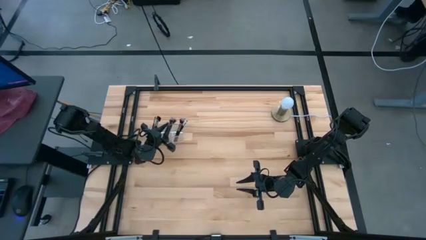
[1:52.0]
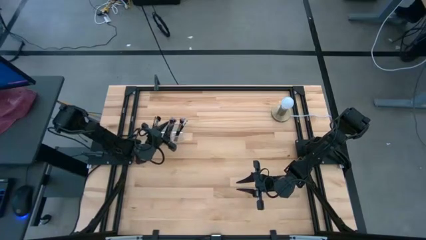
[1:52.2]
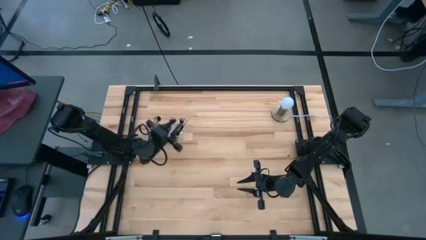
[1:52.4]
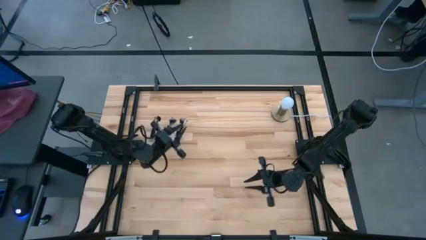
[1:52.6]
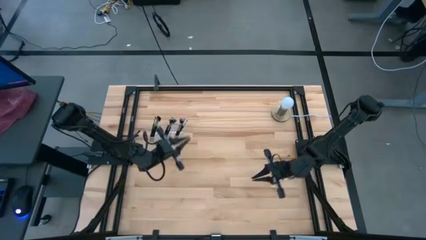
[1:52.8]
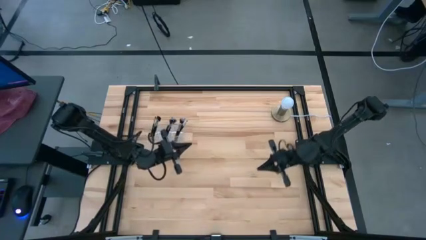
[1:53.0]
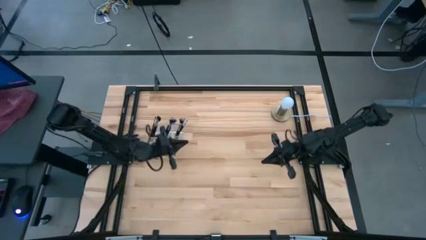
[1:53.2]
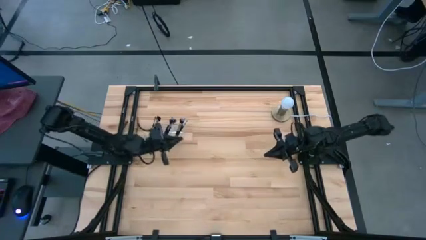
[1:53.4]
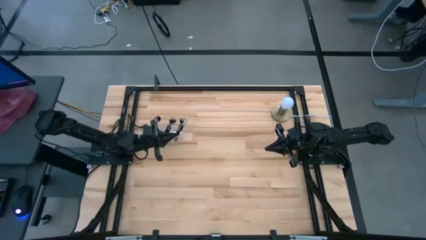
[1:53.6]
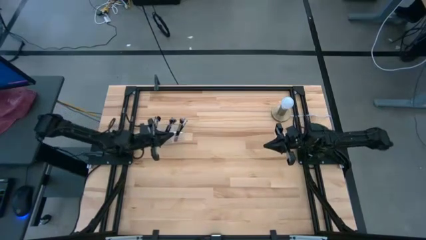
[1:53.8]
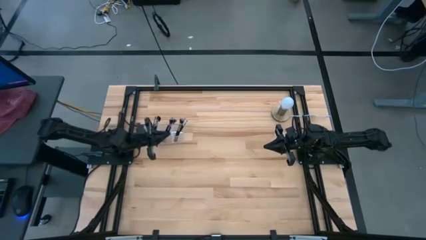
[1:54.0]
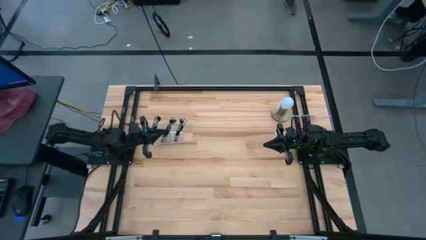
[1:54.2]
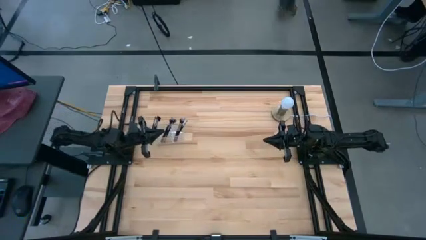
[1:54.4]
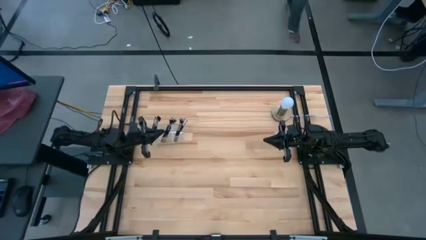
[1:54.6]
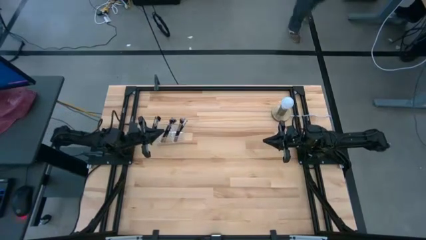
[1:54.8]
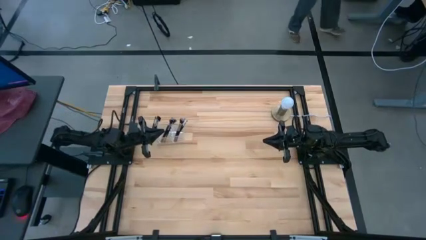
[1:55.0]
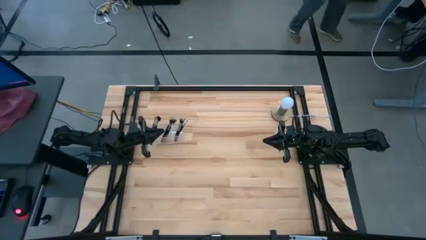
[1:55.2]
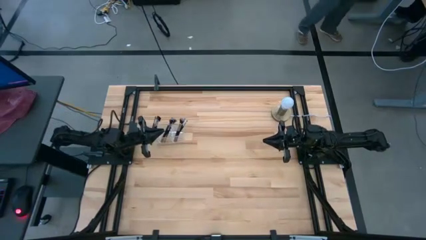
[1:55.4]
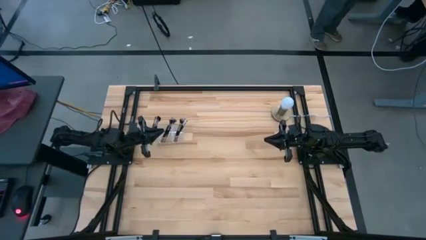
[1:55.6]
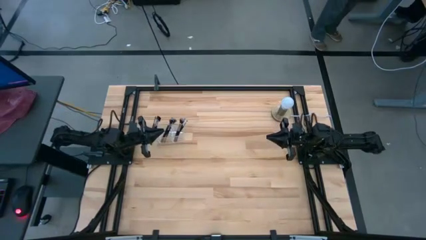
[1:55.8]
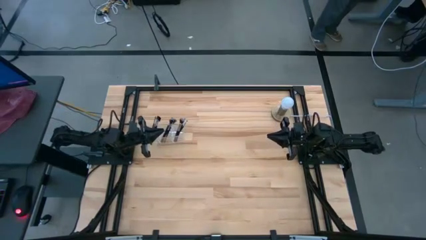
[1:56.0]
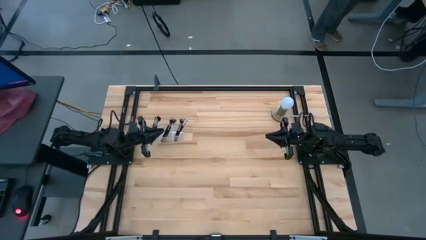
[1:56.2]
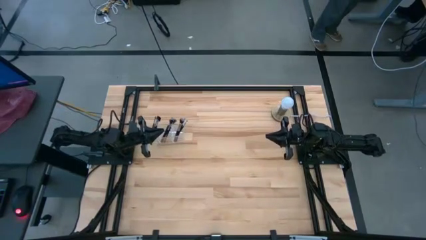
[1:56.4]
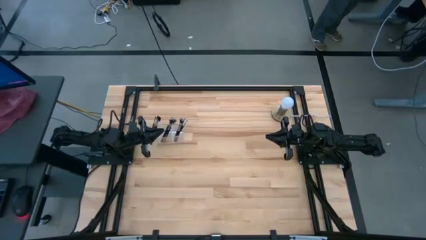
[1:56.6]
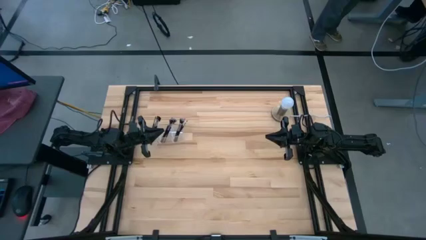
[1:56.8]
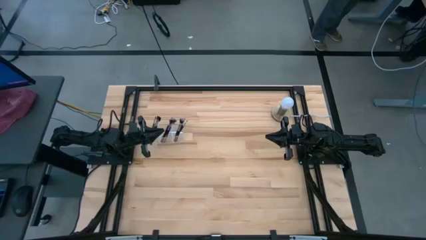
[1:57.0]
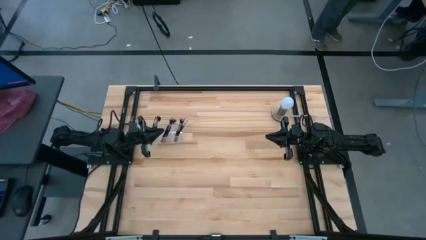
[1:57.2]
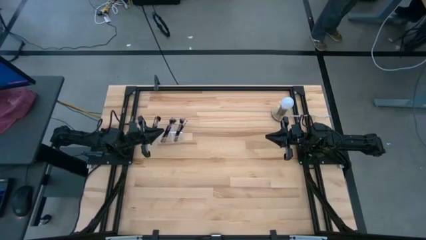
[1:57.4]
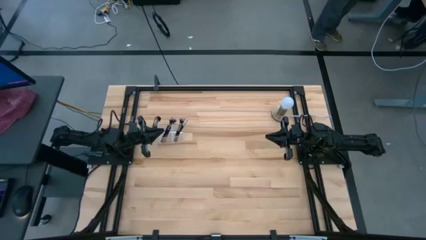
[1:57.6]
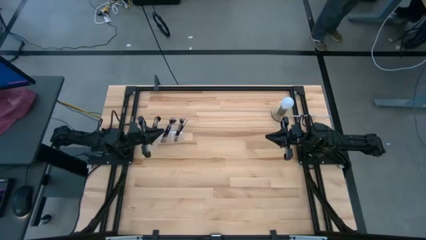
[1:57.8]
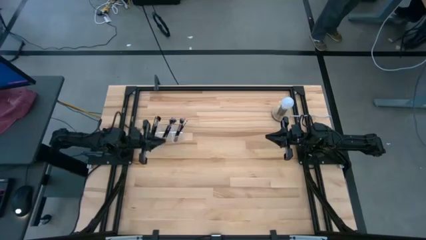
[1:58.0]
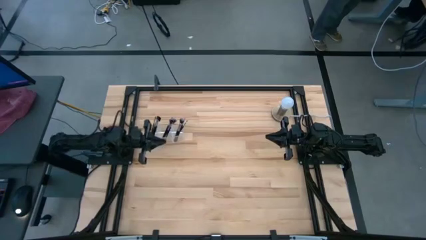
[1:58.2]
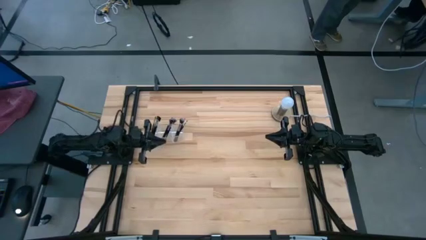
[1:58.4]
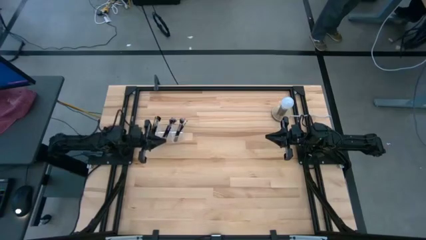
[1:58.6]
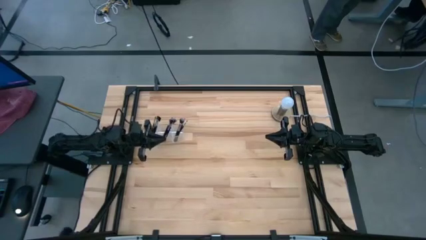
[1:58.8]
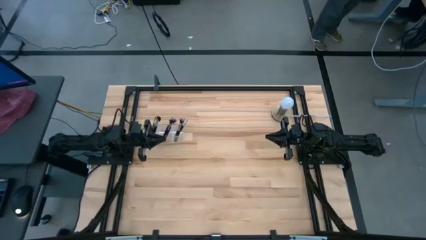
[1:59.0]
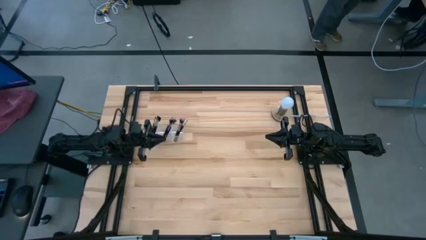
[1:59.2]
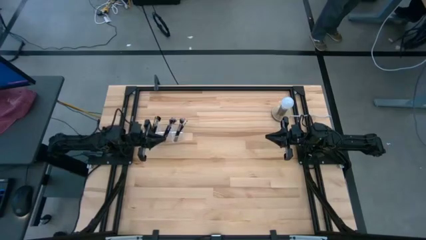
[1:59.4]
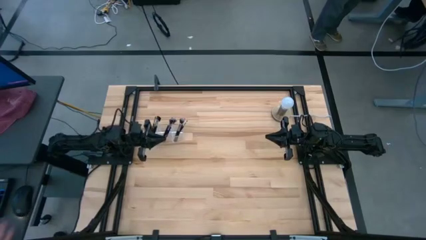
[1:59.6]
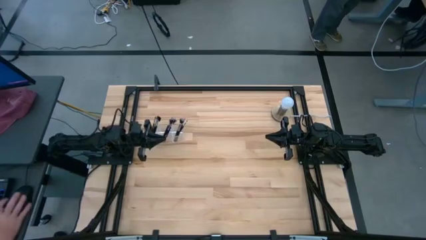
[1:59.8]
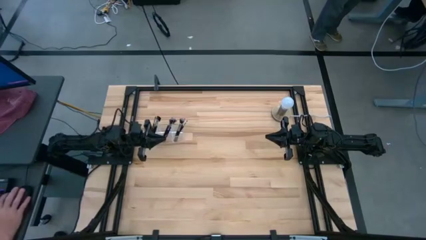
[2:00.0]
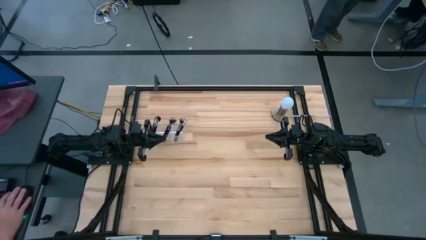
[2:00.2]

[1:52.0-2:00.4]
Task: Pick & Place Makeup Brushes
Return to Home Position

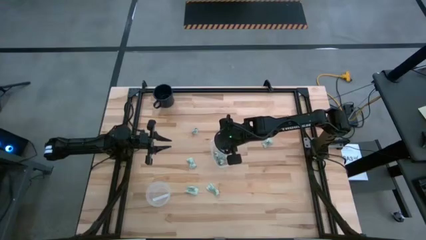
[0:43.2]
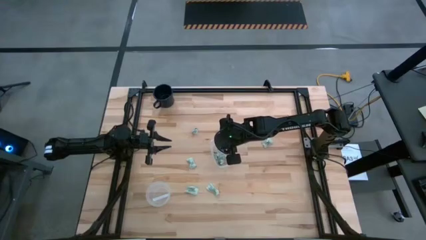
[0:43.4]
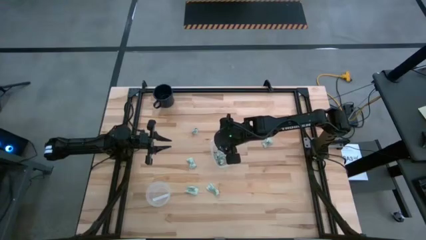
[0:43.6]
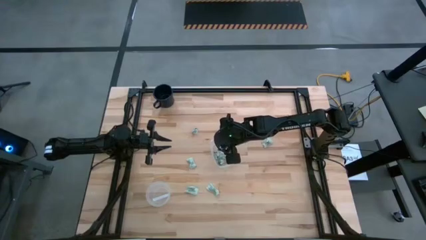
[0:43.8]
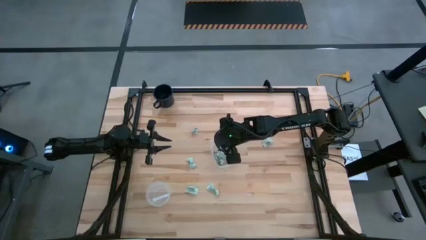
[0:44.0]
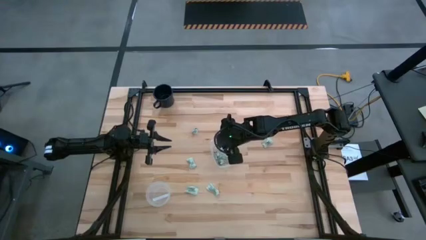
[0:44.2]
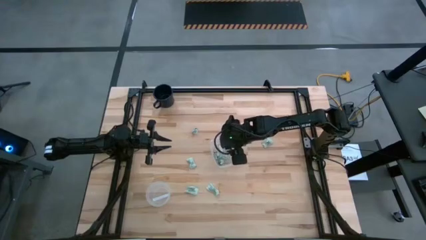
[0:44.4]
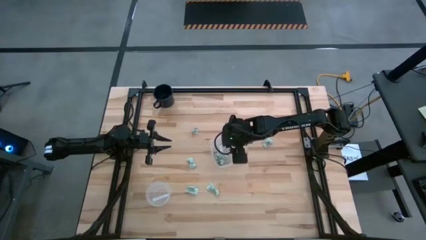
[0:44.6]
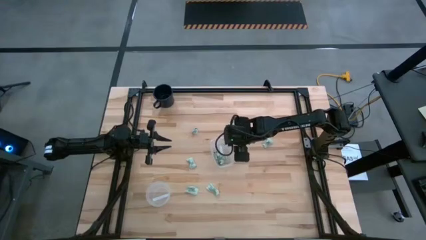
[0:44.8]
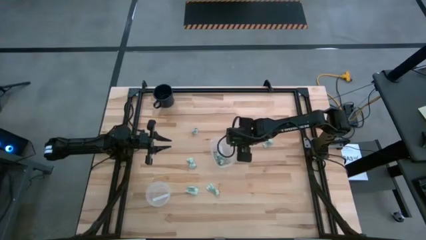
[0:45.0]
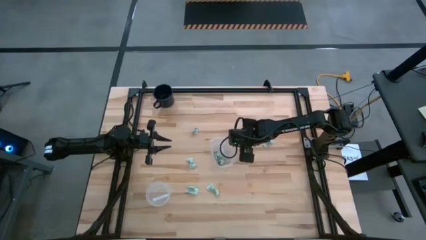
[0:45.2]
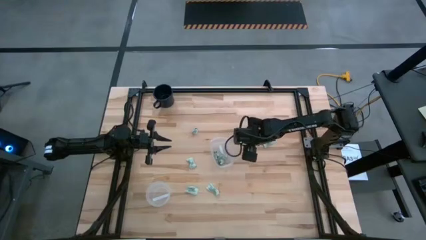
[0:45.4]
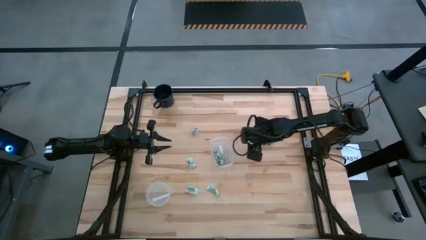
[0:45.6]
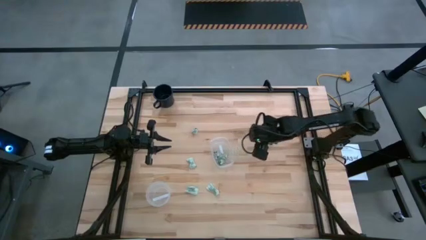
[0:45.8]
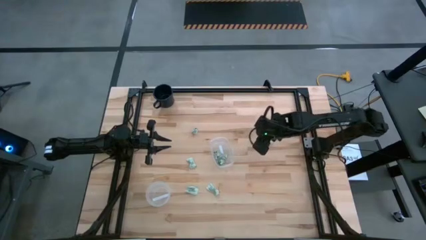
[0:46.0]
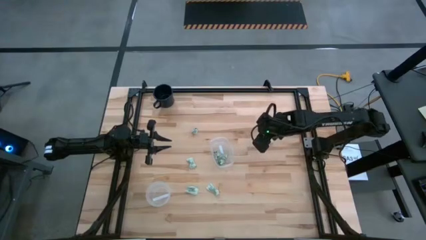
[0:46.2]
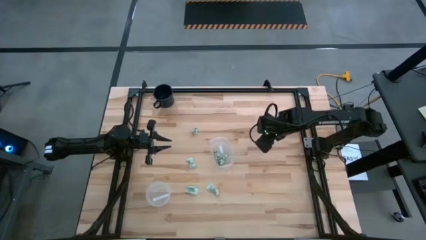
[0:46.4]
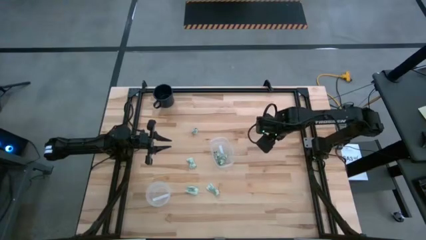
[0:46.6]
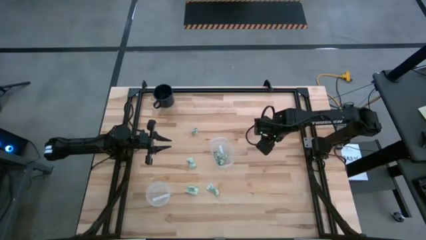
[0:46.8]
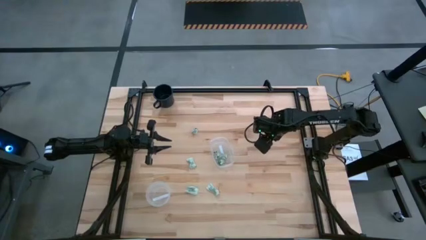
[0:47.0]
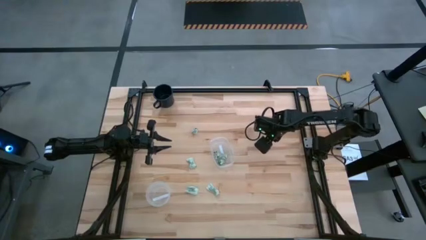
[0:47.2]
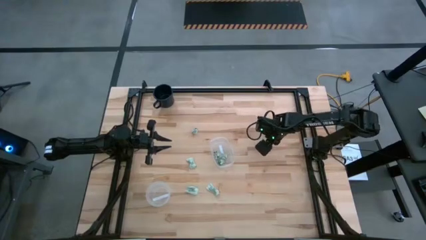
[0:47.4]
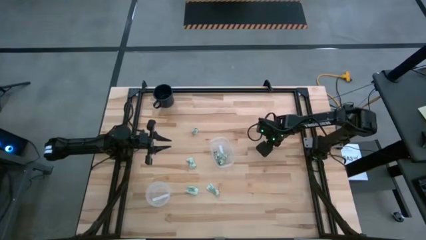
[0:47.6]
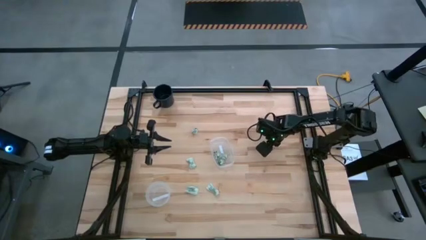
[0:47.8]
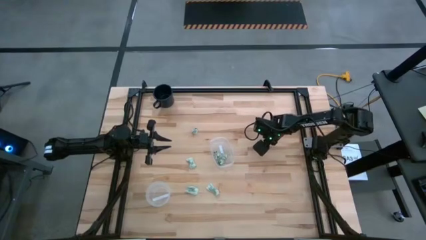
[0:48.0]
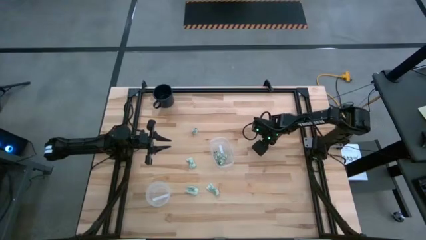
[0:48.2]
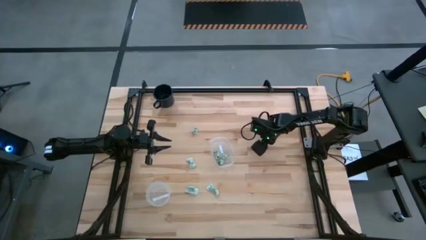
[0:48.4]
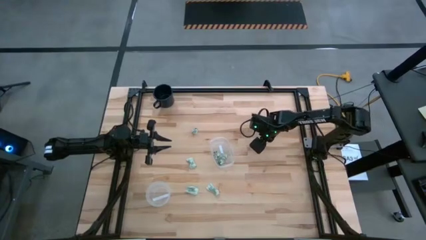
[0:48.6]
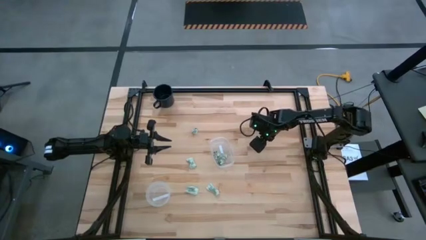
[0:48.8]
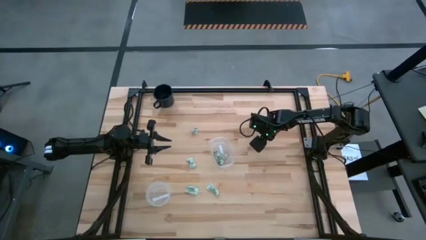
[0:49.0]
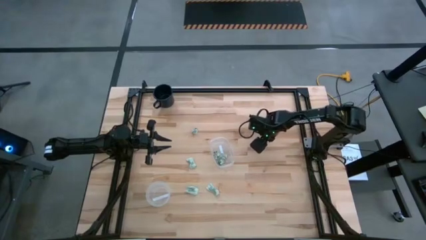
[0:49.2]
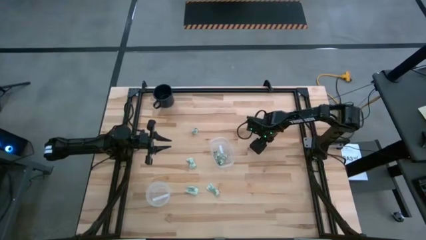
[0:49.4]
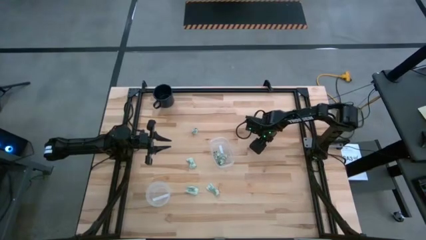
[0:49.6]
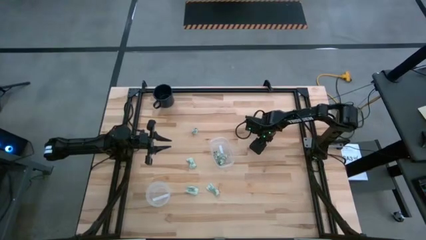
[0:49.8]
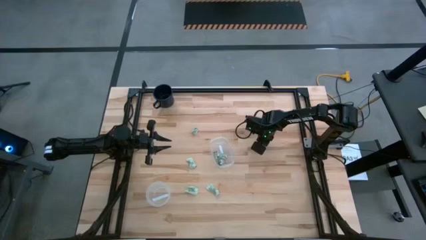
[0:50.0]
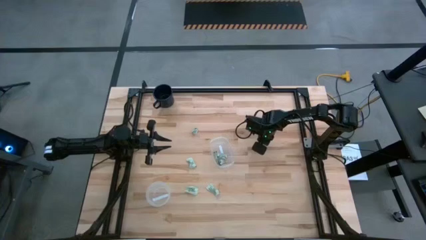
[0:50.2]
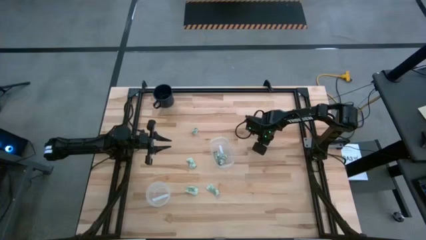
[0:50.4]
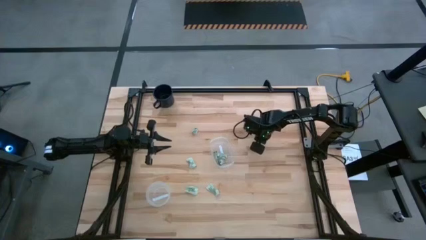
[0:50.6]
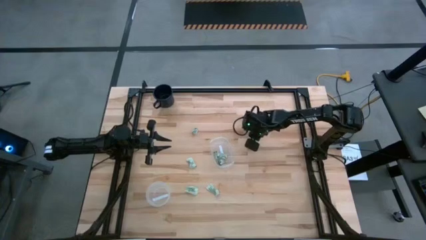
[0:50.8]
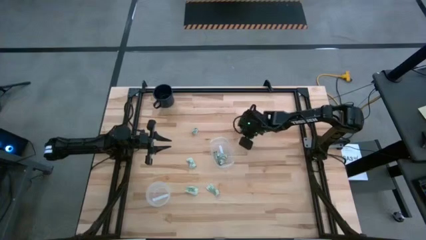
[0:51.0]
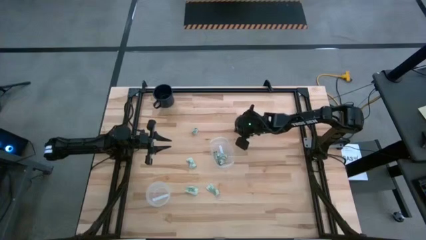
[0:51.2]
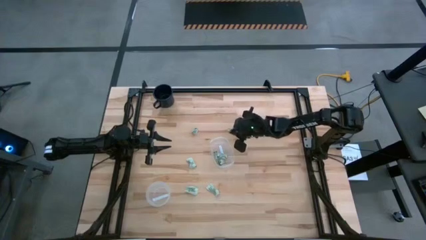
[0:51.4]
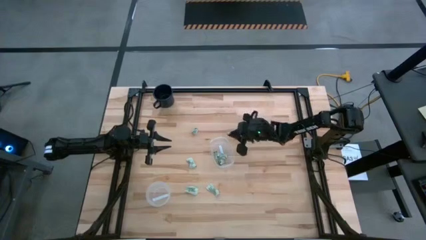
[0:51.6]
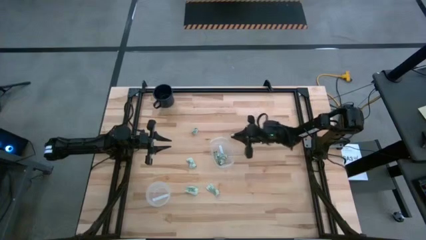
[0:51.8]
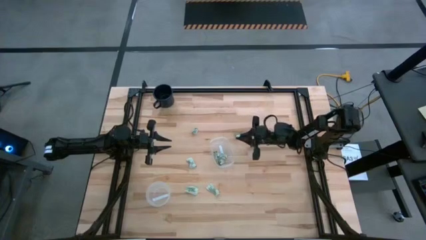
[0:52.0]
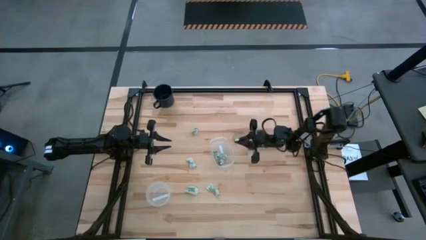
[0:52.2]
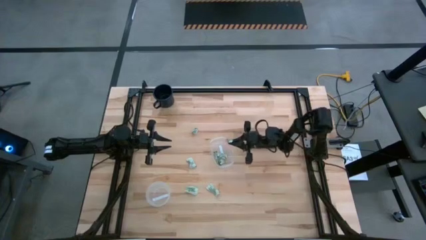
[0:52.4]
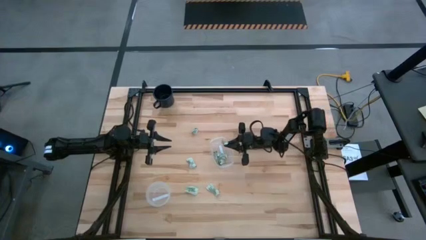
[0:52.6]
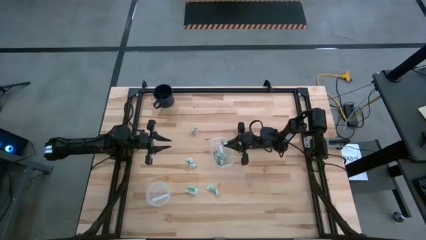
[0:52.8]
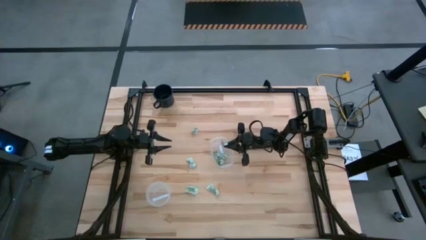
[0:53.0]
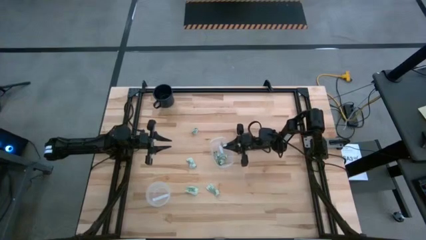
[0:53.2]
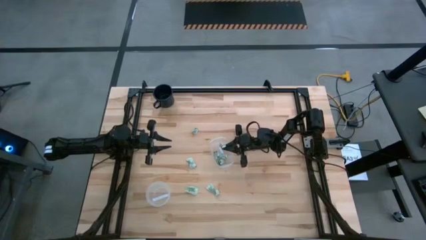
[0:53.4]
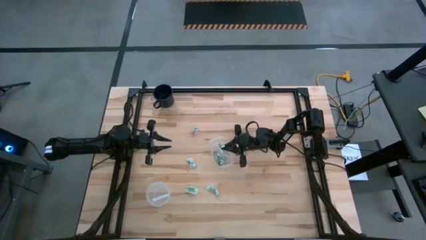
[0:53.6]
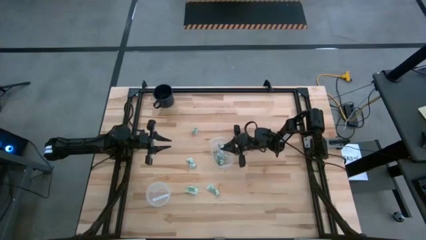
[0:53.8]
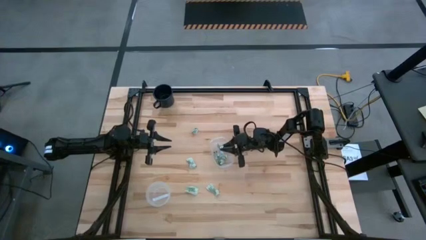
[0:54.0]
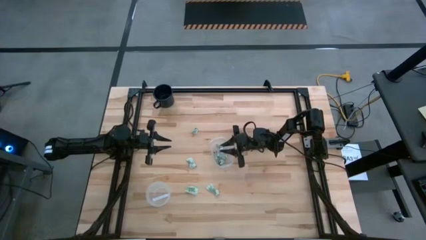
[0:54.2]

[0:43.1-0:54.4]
Task: Pick and place items into bin
Put the stevia packet into the transparent bin
